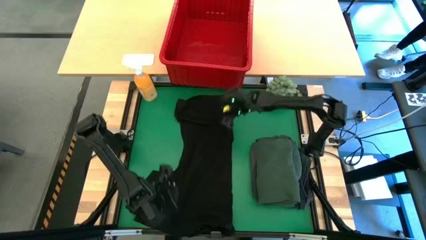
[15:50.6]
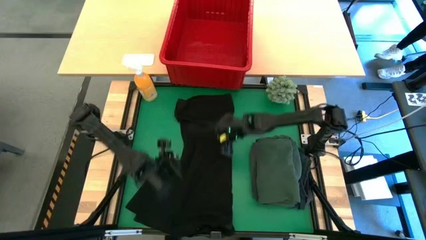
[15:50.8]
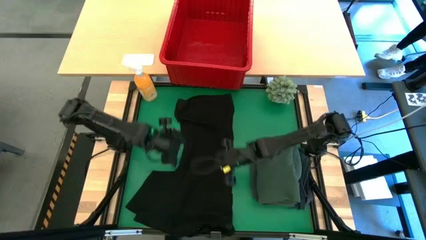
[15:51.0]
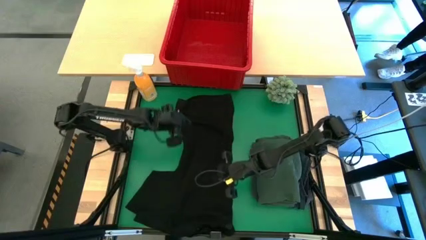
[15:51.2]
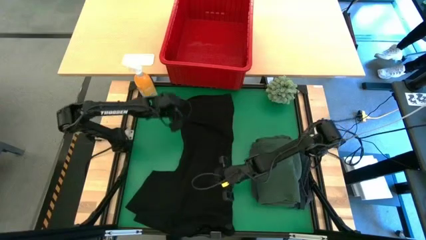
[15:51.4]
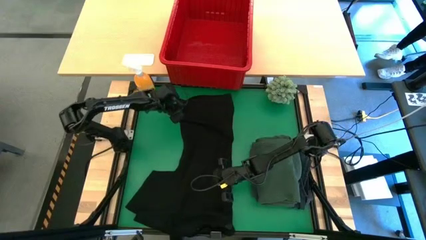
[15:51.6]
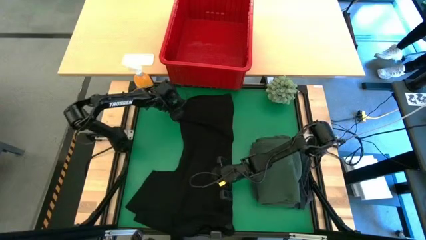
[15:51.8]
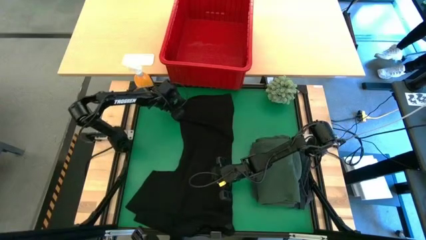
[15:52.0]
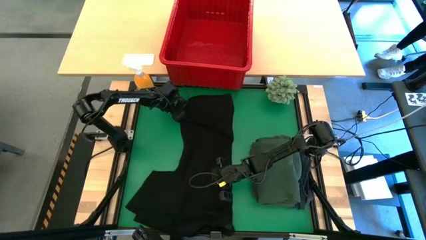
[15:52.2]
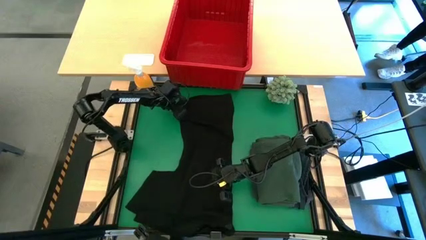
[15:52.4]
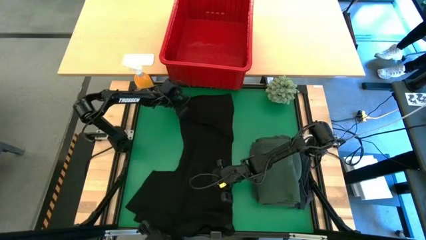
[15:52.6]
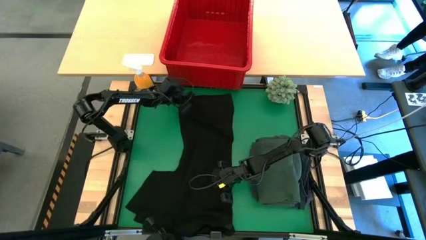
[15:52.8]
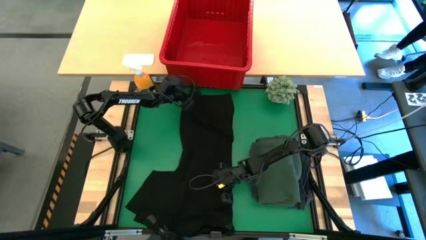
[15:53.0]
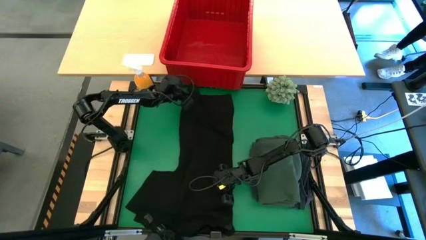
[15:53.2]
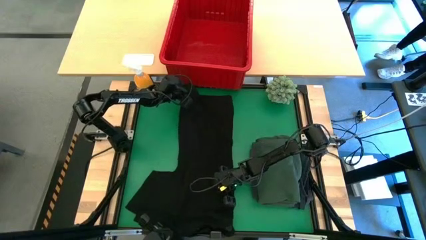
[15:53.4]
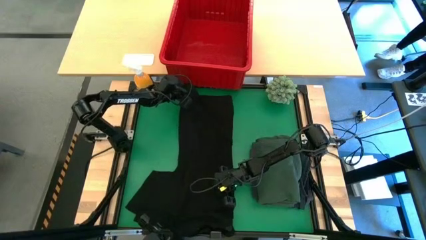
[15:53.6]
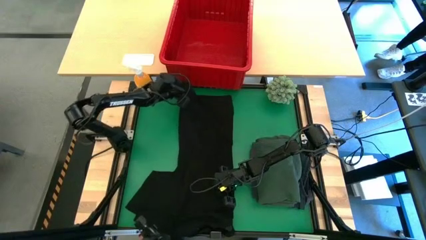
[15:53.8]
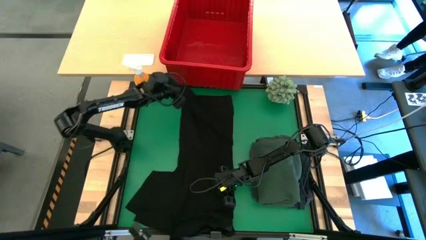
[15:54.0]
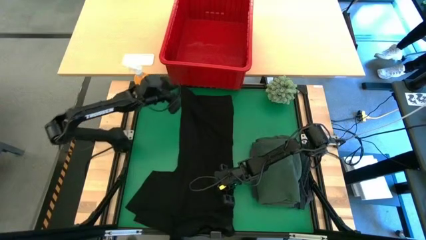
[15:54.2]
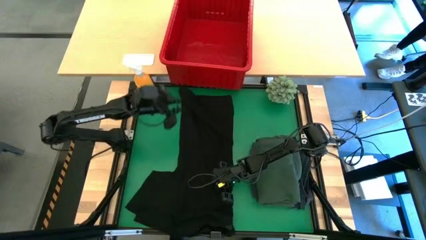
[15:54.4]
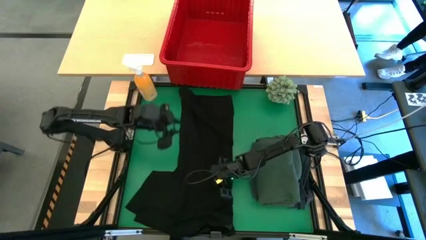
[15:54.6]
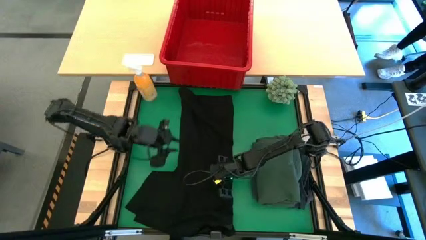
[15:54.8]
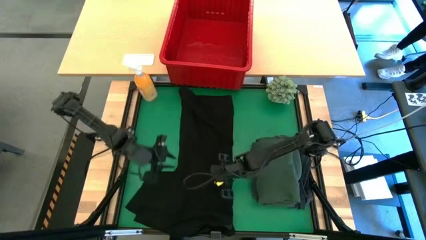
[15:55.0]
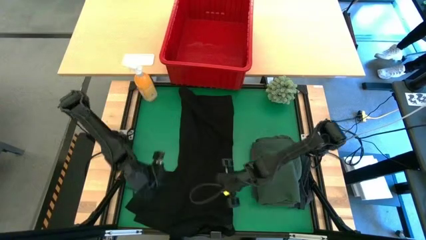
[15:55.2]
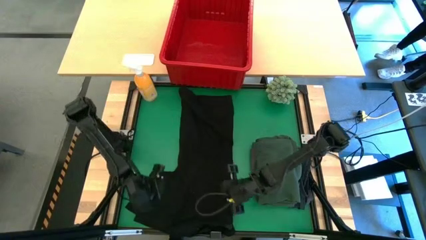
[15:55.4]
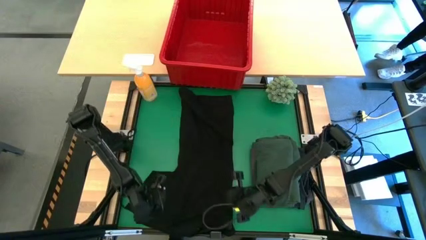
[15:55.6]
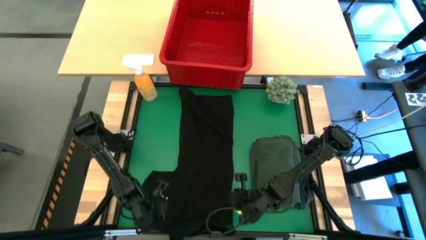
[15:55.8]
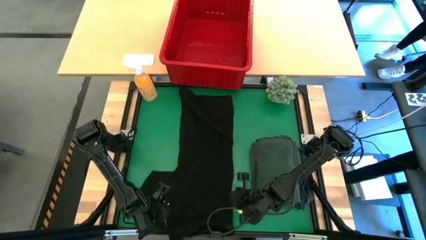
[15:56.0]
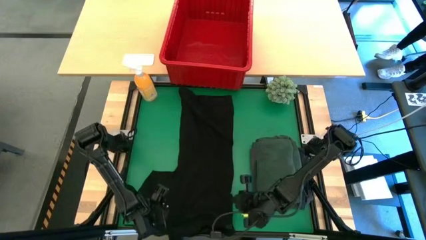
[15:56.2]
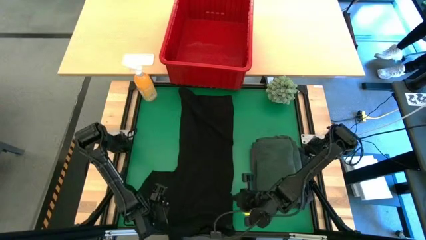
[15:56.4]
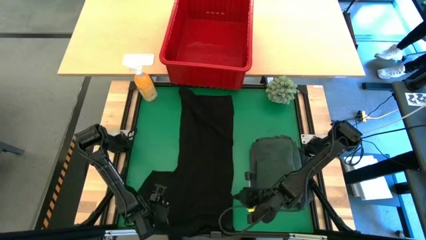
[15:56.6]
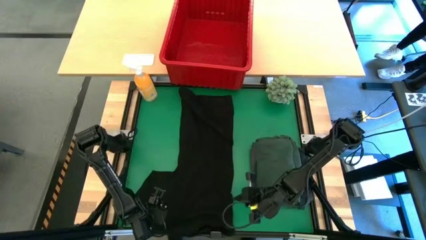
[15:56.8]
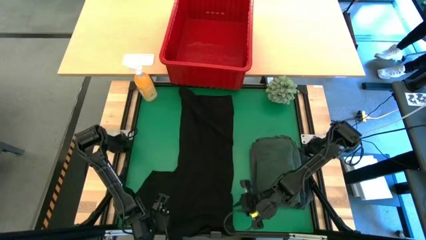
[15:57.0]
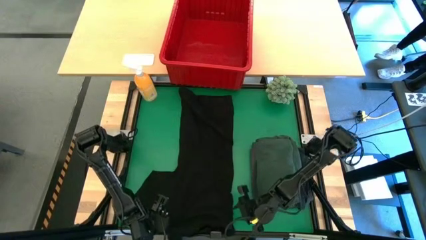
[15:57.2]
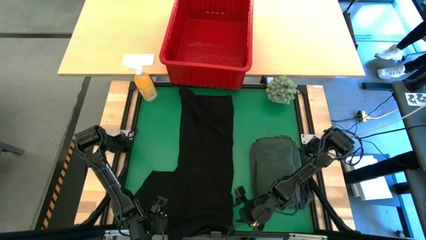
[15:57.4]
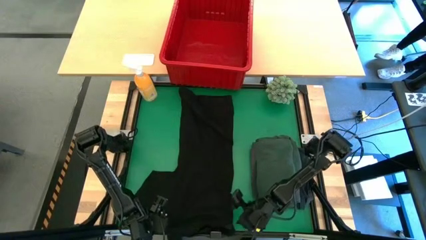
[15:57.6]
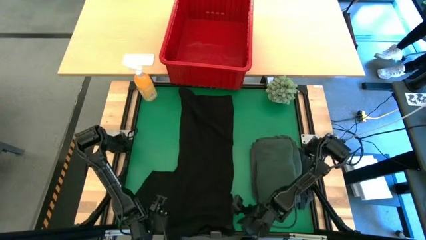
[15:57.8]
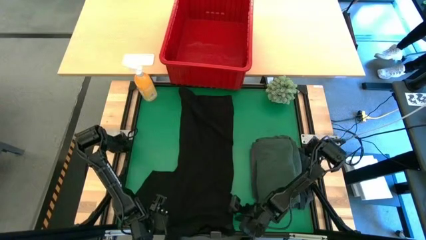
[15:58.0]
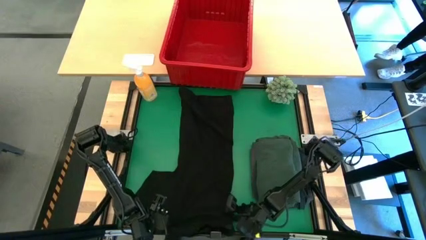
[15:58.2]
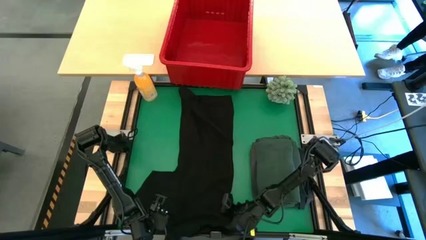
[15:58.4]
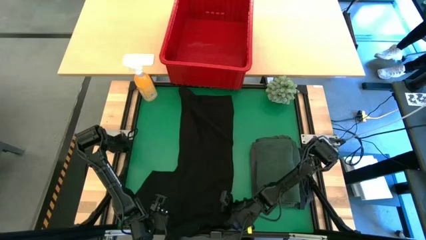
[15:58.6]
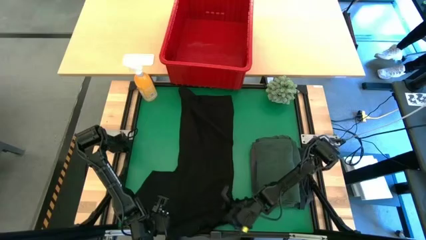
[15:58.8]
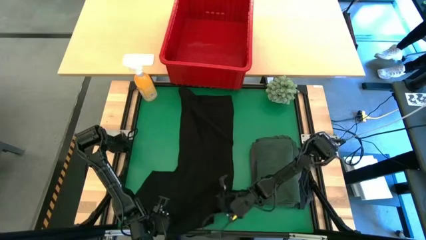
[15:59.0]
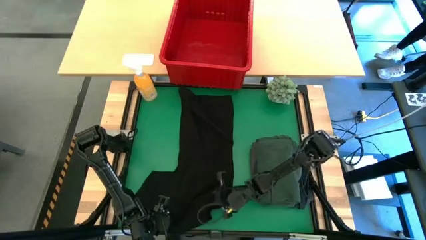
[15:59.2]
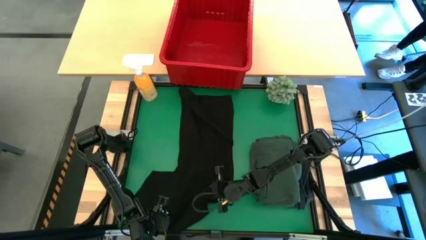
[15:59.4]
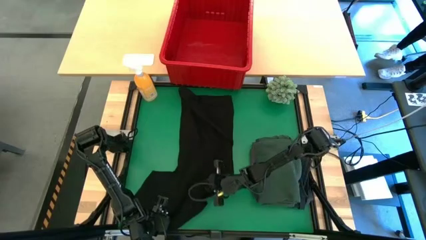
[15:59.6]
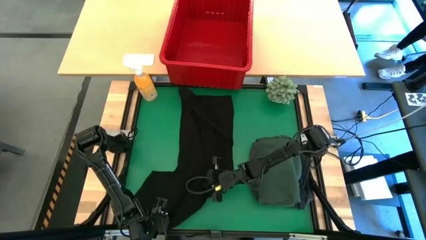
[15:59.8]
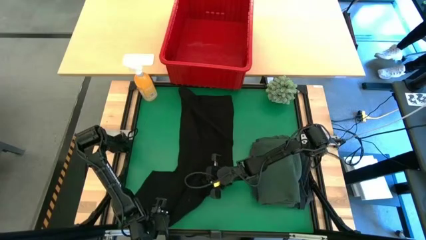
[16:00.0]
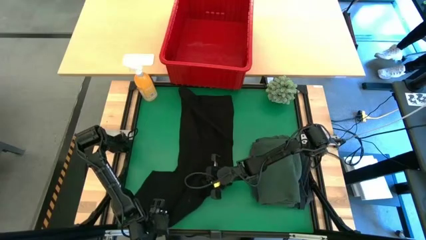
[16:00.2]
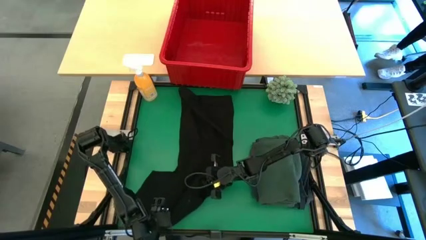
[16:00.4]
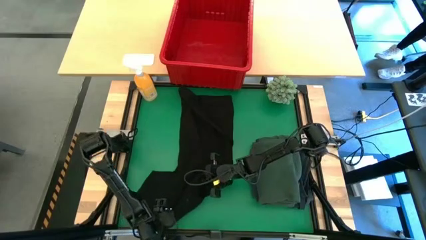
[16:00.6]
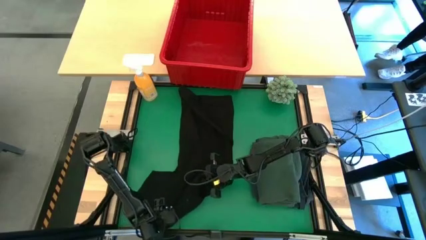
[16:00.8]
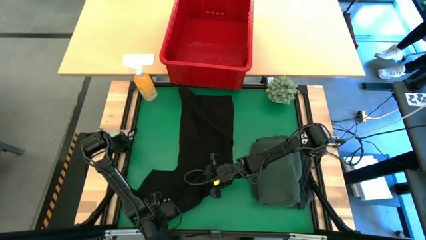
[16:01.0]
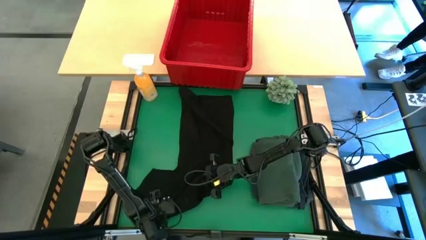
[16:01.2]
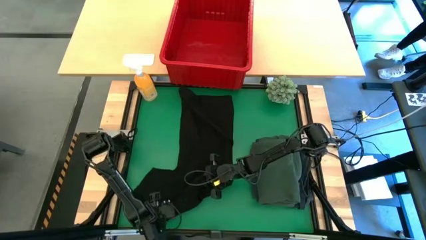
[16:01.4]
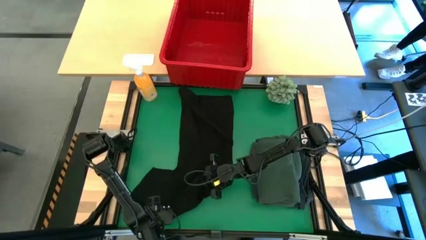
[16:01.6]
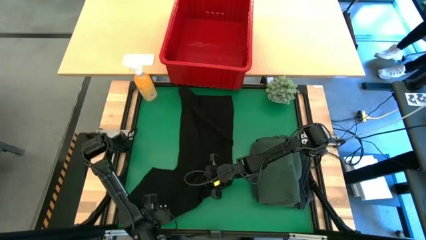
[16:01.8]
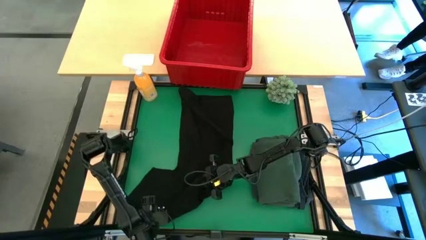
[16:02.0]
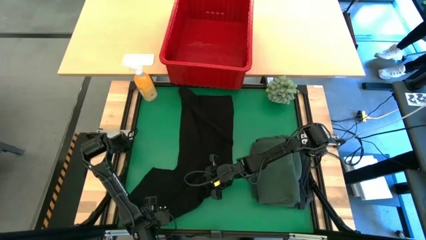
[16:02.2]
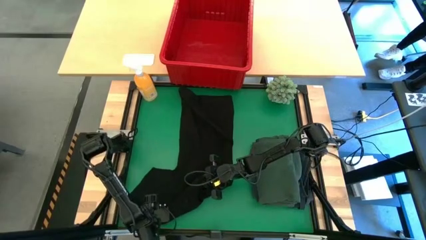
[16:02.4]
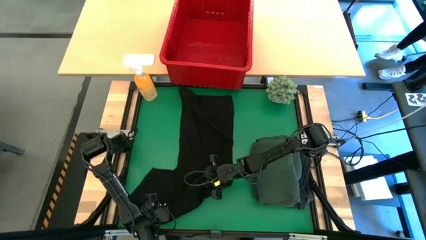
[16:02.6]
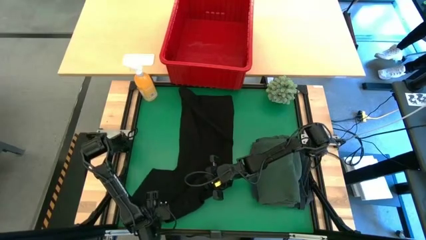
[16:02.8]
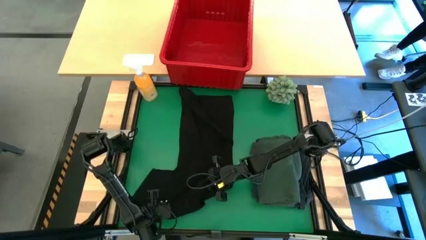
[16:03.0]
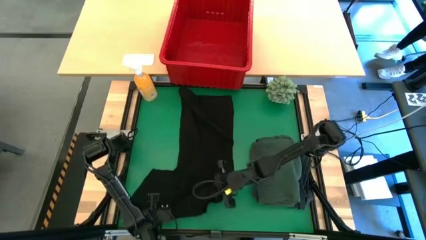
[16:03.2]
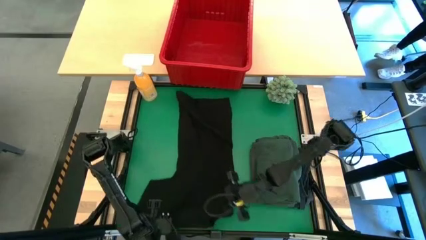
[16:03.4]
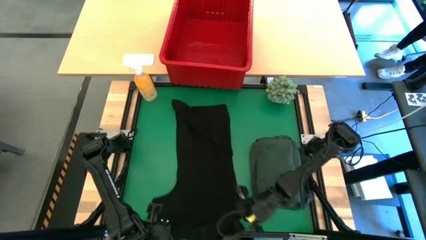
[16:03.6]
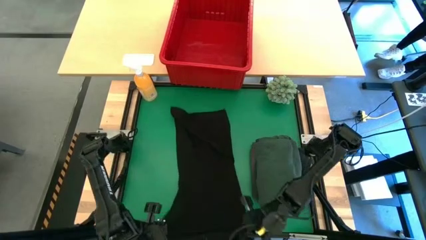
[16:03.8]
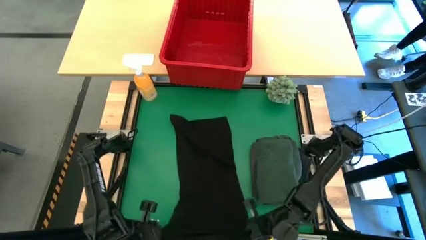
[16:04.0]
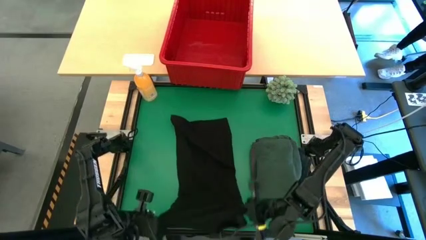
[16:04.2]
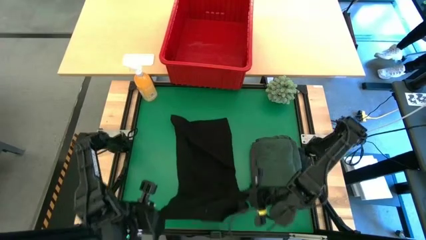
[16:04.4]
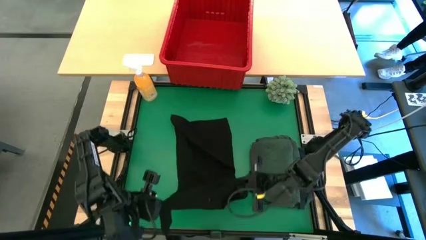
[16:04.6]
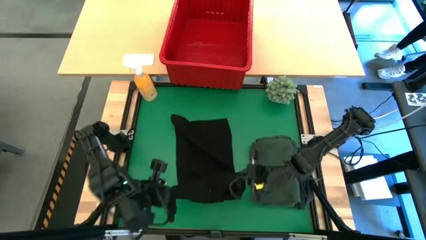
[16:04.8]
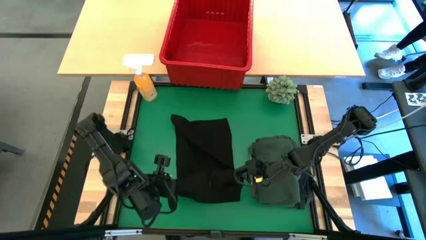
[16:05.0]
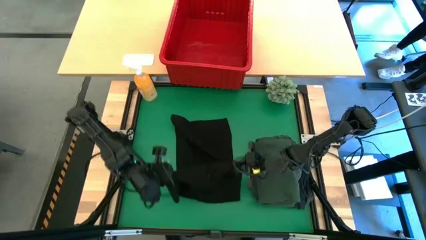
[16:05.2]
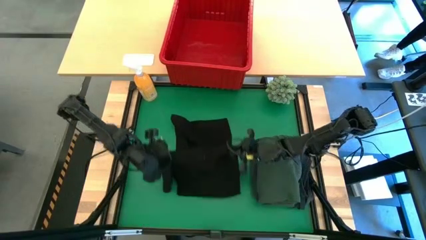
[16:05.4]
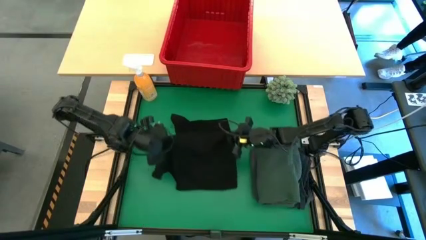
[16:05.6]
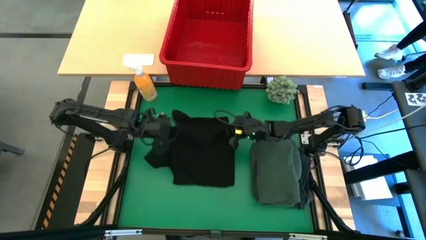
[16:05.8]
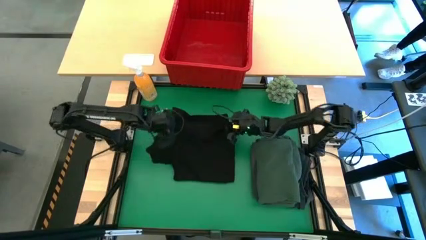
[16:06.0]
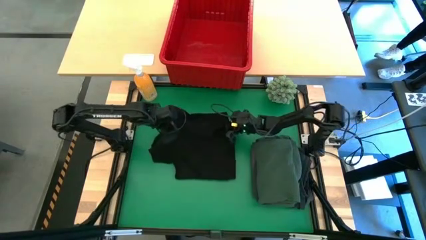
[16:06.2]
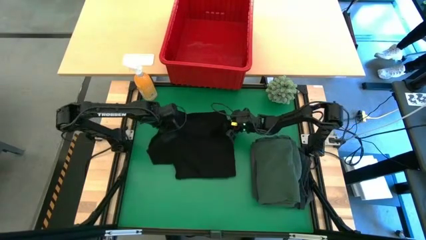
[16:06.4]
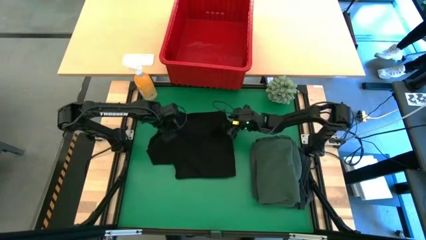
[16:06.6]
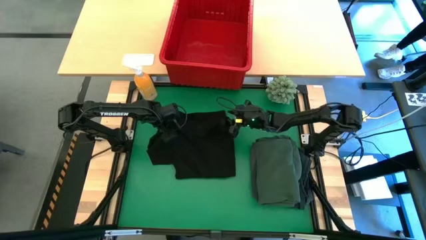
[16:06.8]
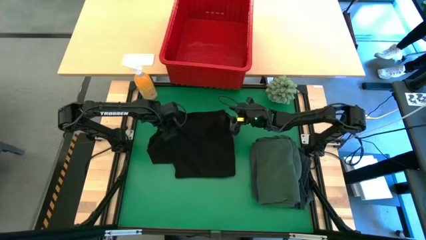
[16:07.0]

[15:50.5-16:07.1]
Task: Fold Laundry from Bin
Fold the black shirt
